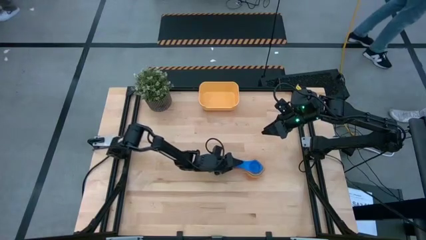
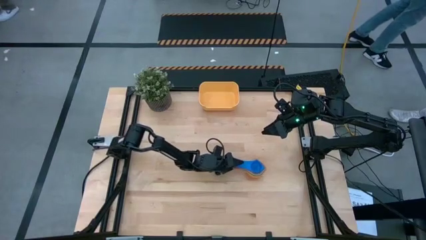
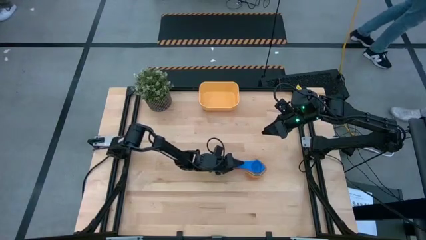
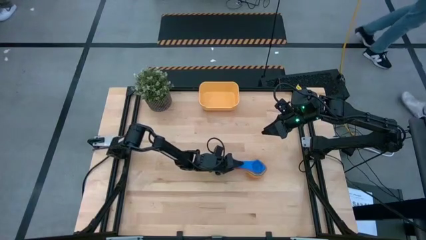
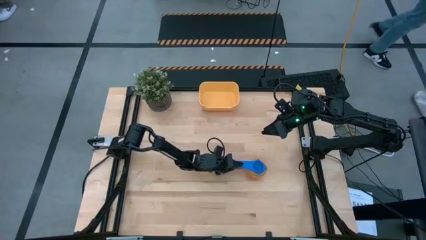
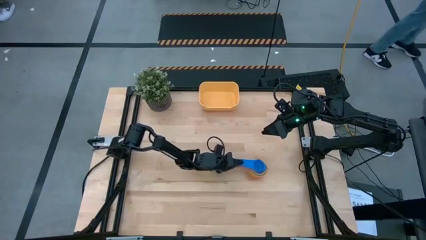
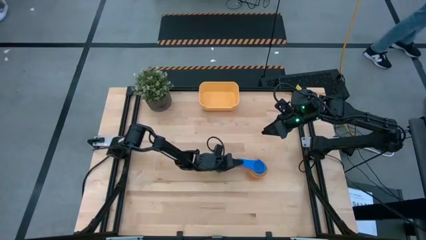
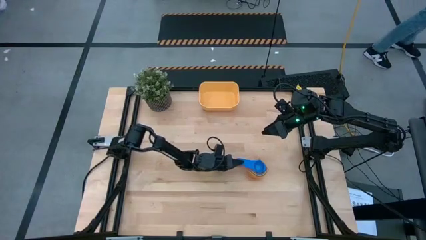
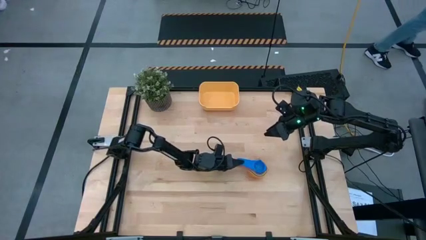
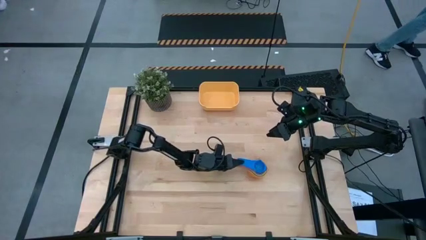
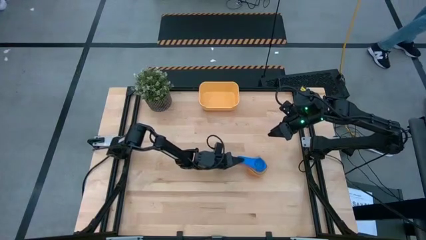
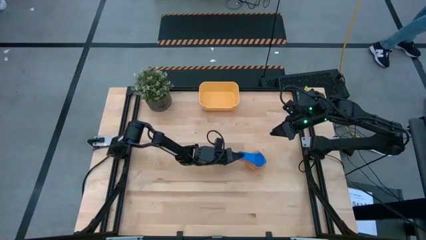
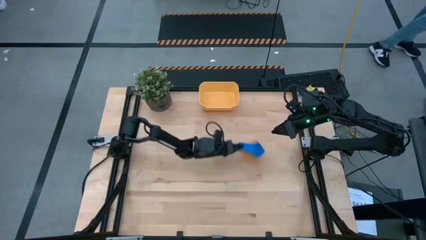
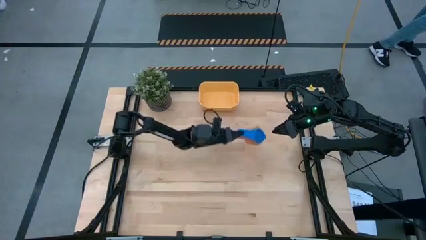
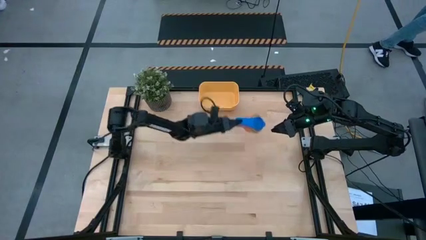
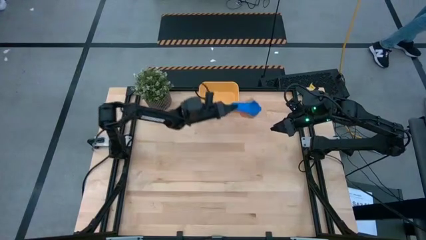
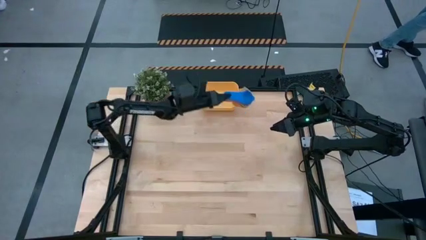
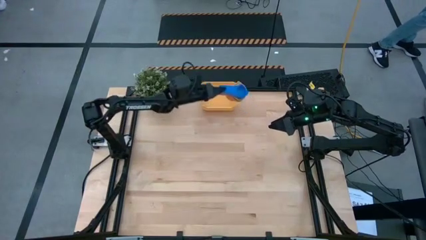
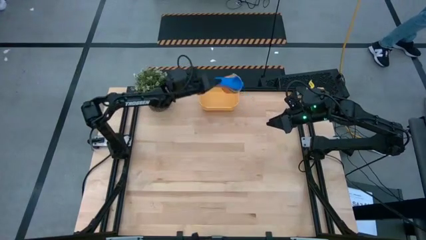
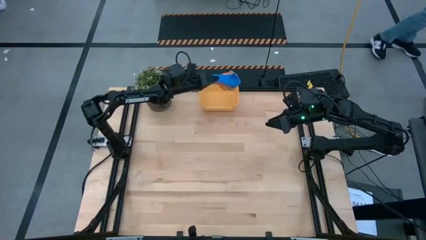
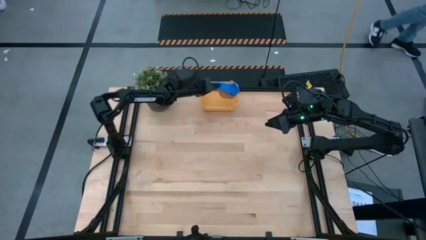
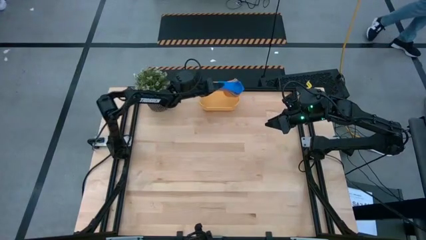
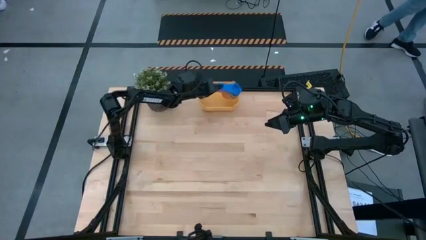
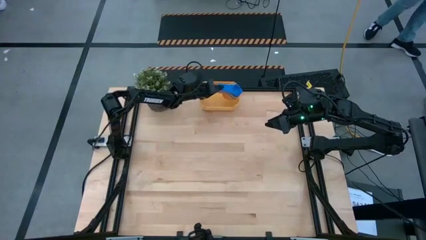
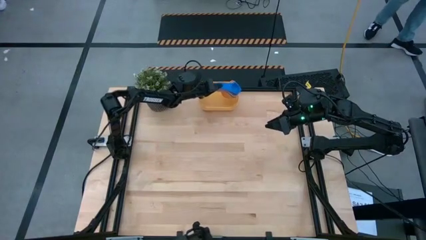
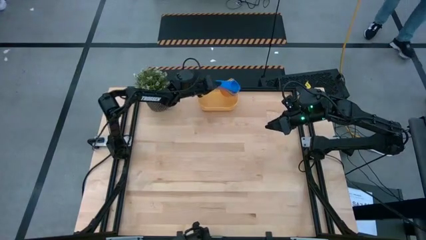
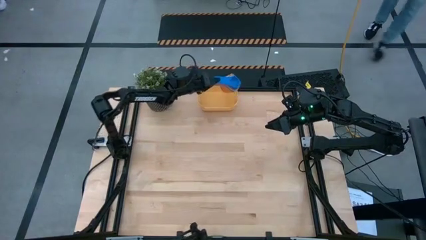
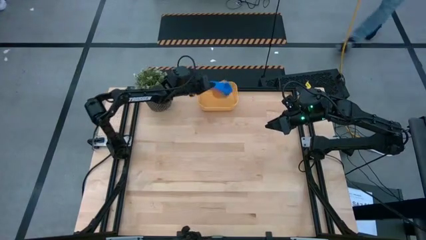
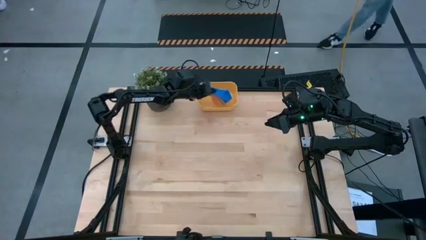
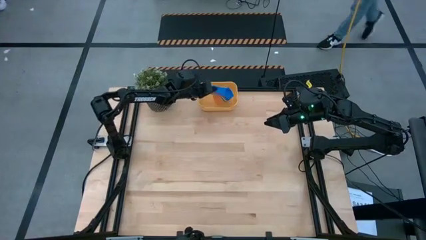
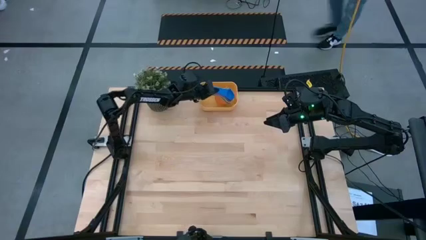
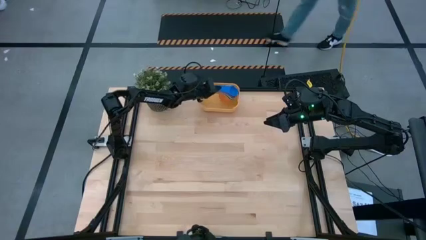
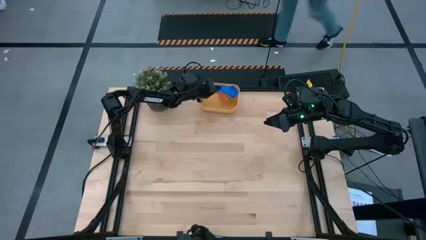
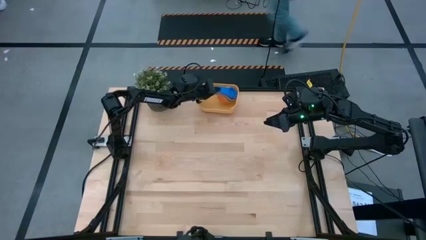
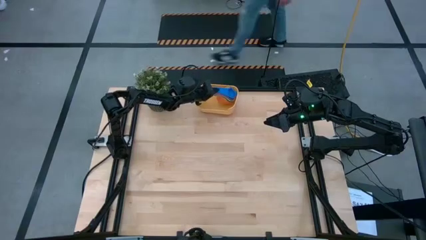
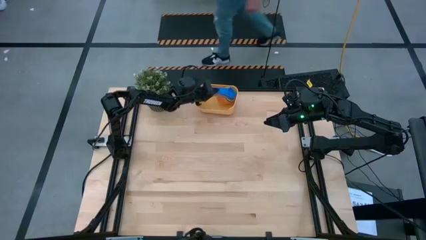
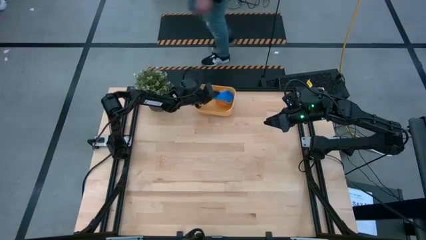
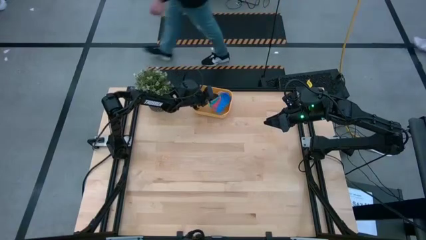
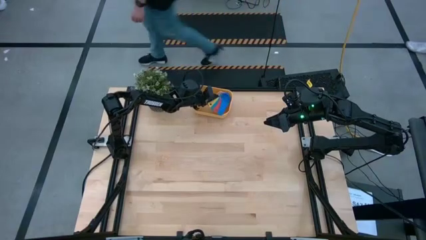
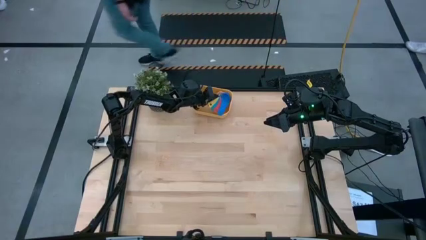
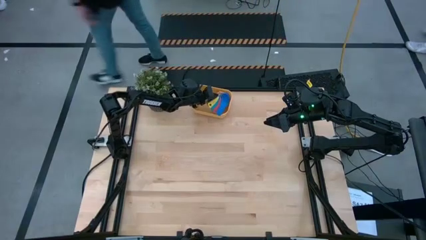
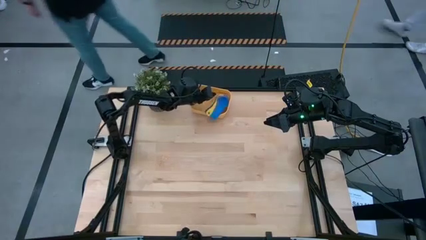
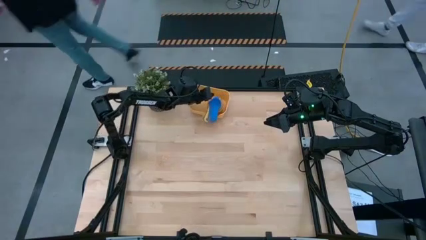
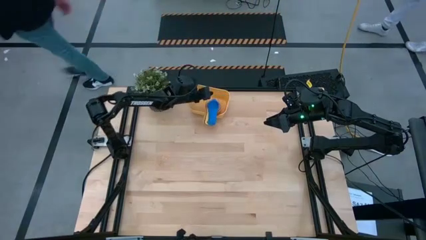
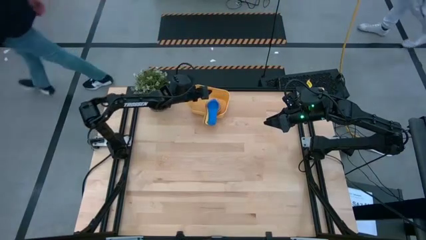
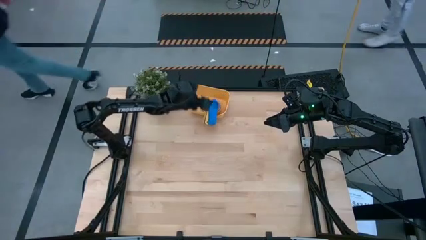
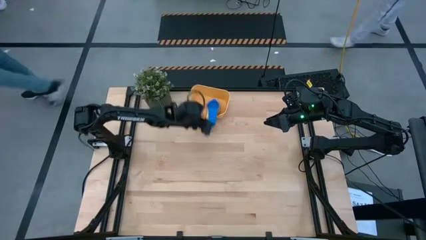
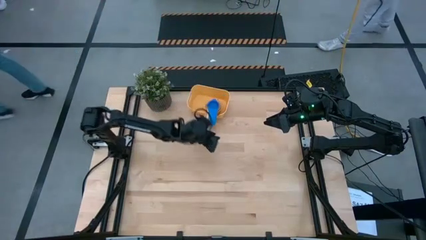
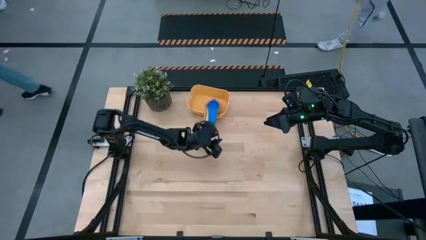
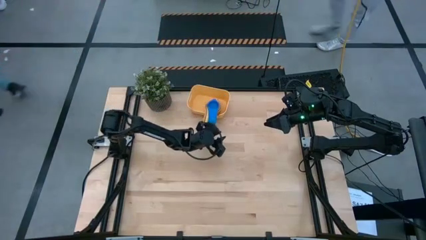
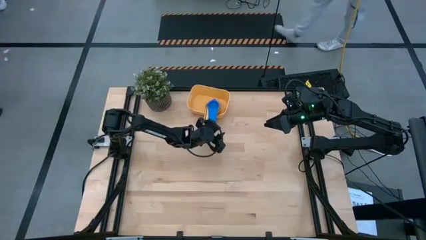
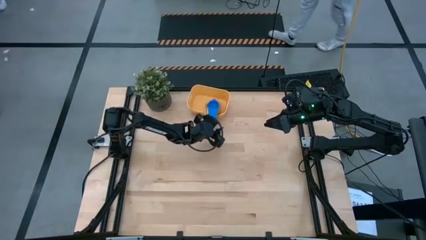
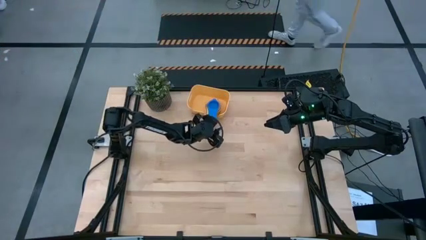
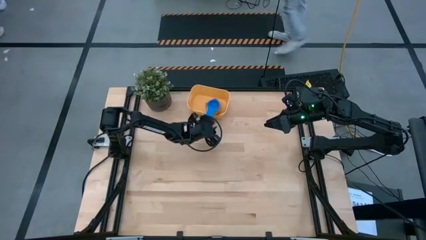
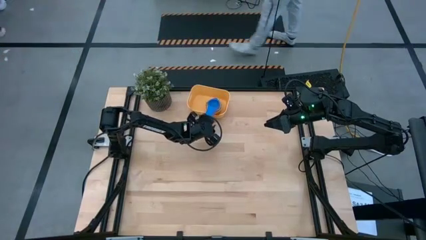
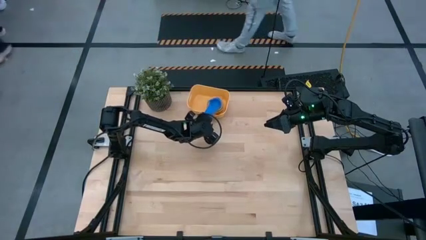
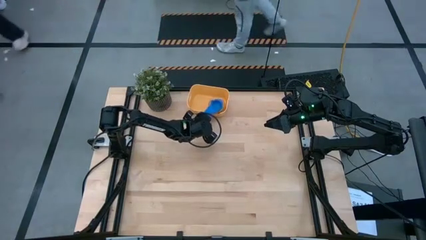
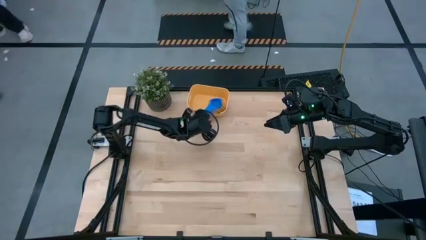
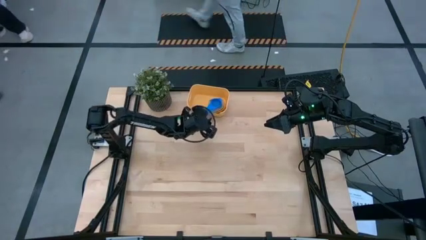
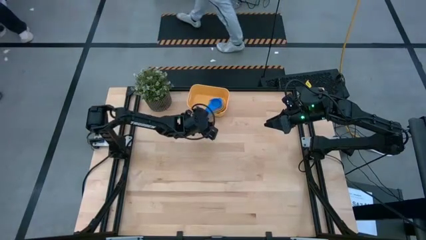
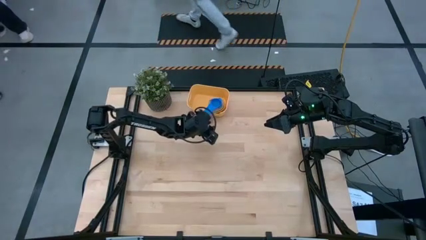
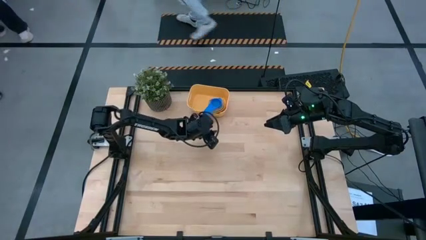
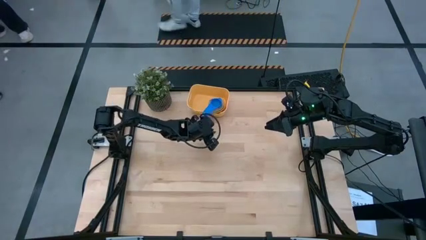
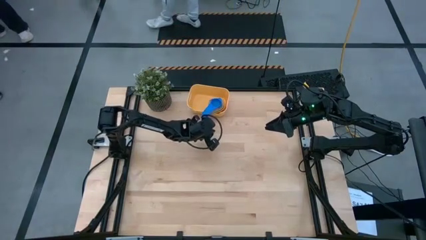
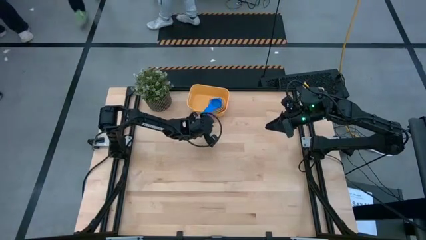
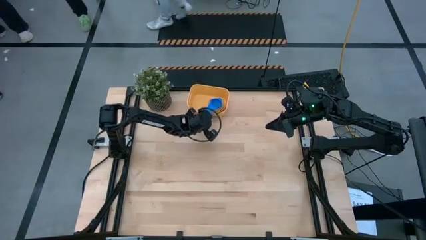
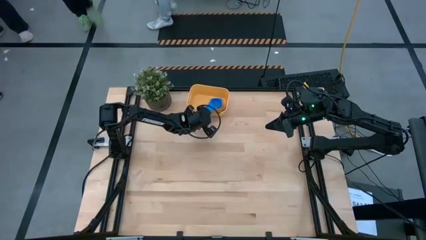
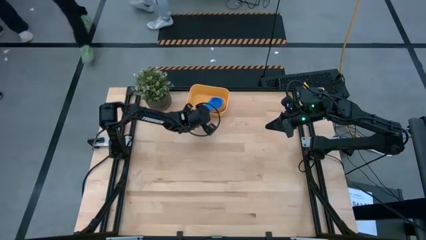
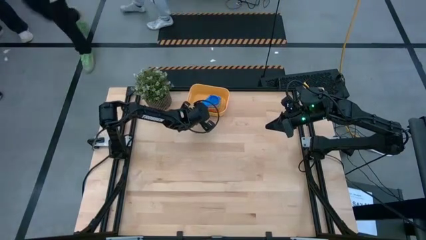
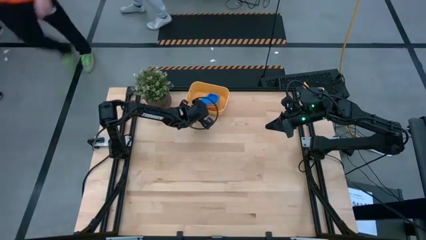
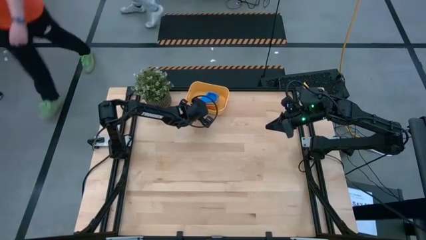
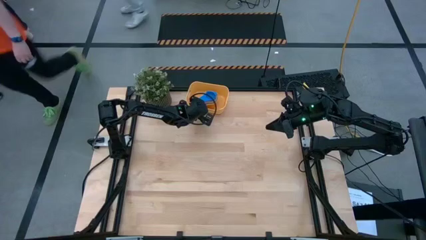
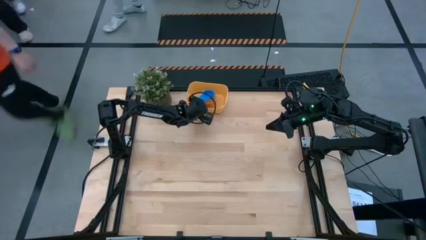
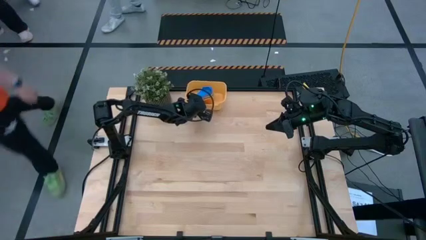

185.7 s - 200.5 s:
Task: Nest measuring cups in basket
Put the stacked measuring cups into the yellow bin

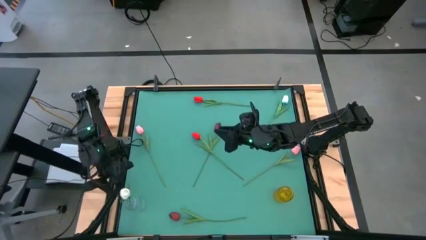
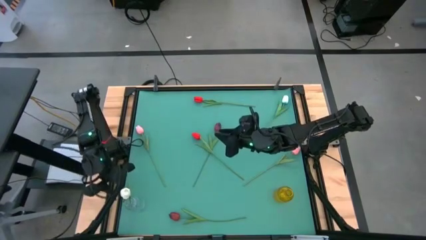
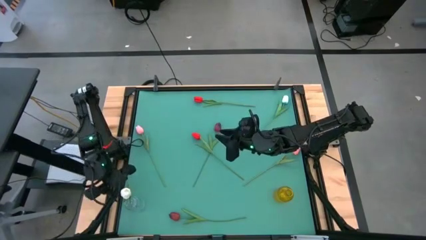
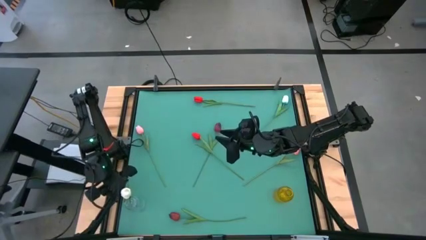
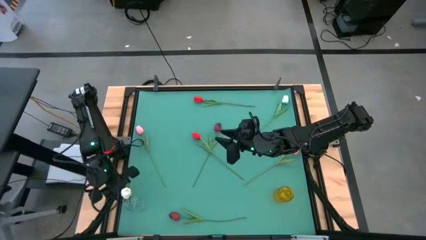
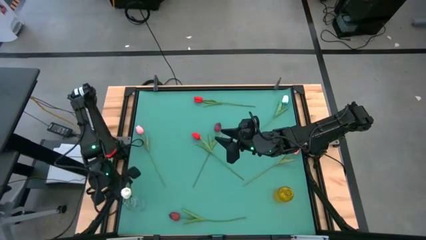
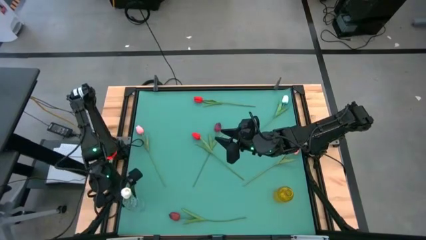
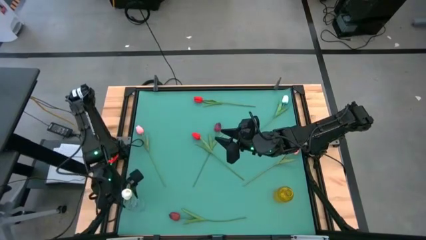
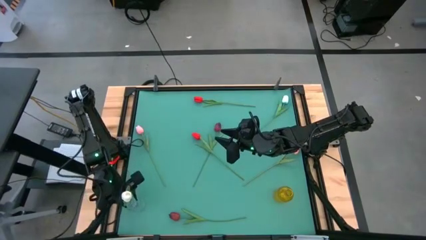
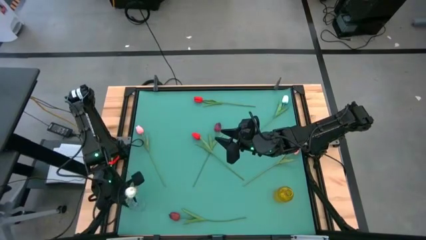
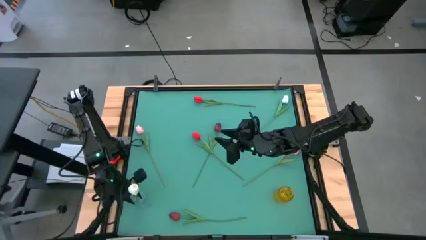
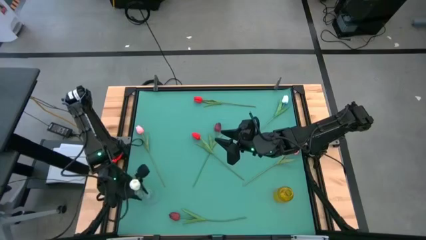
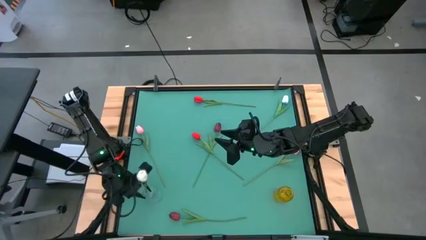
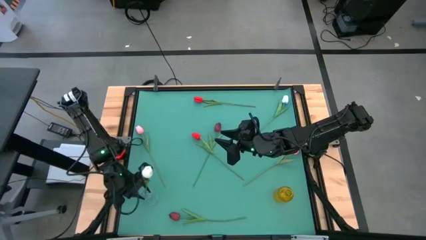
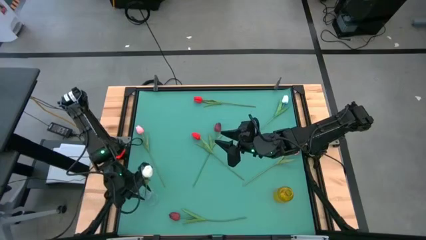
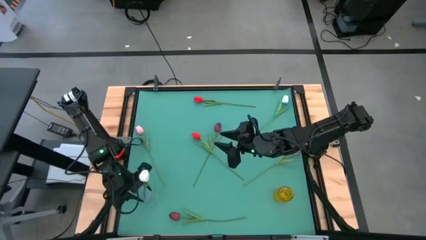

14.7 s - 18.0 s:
Task: Sort flowers into vase by color
Adjust the transparent vase
